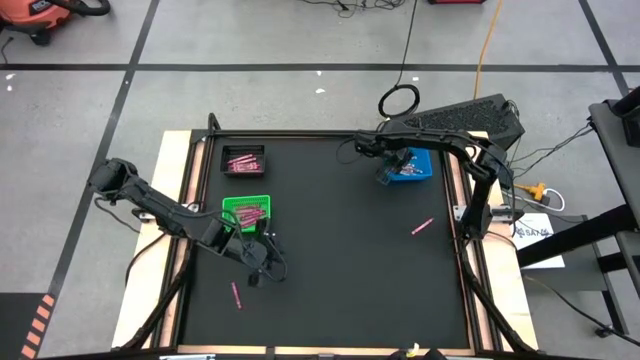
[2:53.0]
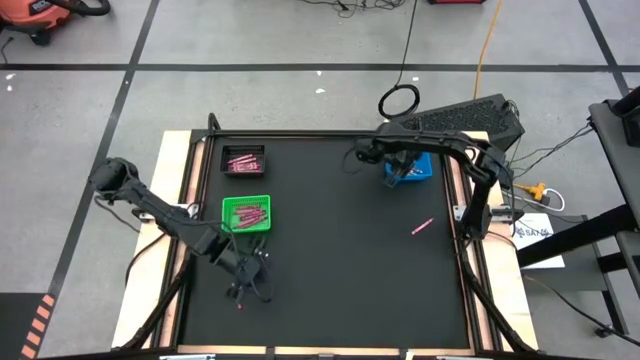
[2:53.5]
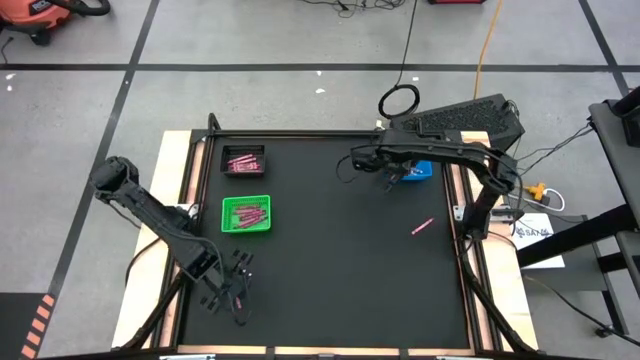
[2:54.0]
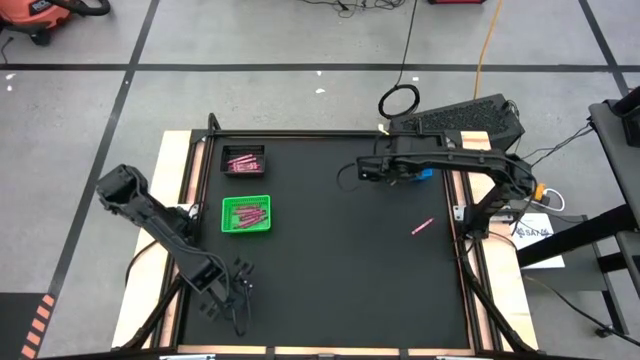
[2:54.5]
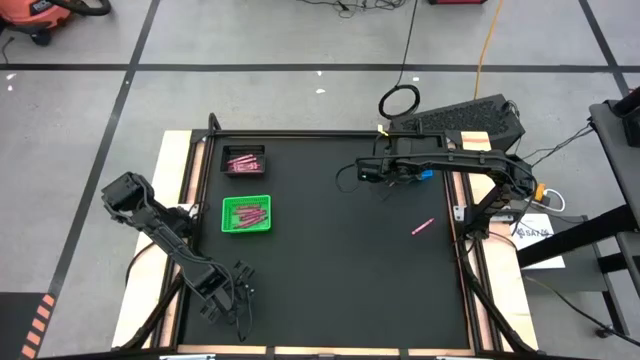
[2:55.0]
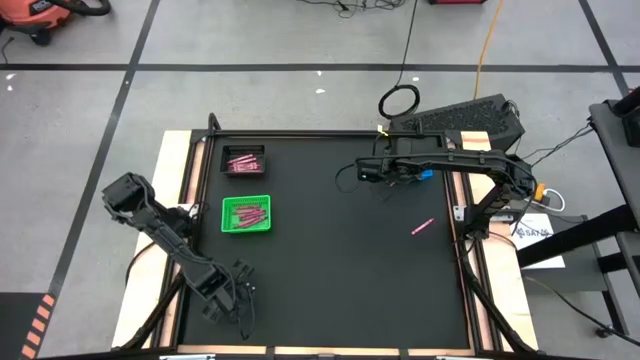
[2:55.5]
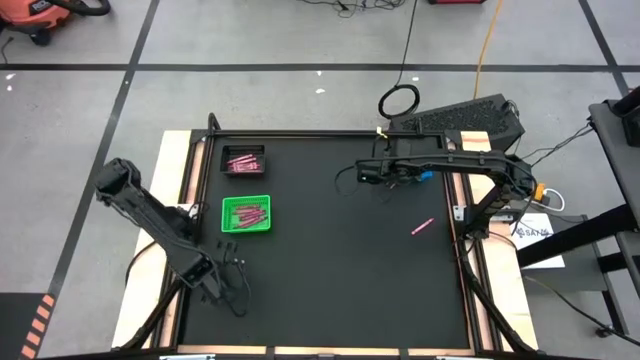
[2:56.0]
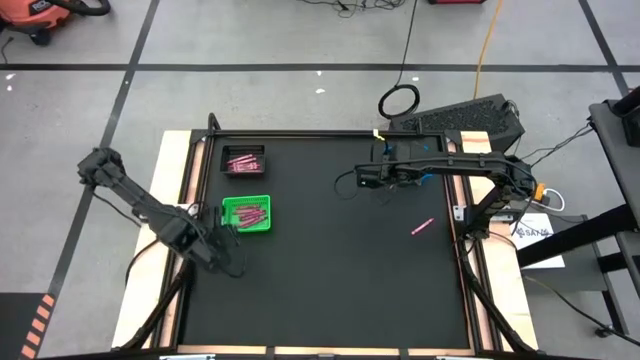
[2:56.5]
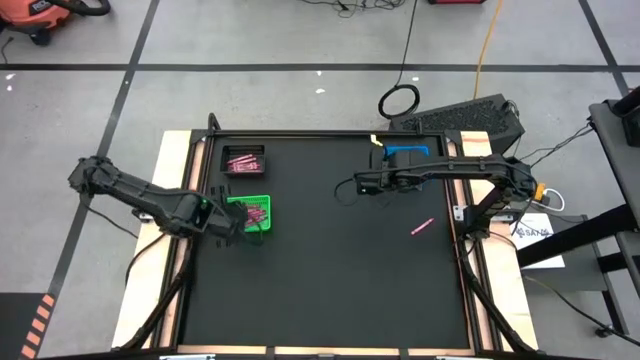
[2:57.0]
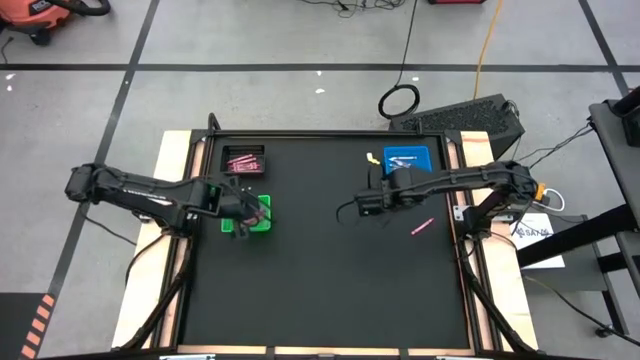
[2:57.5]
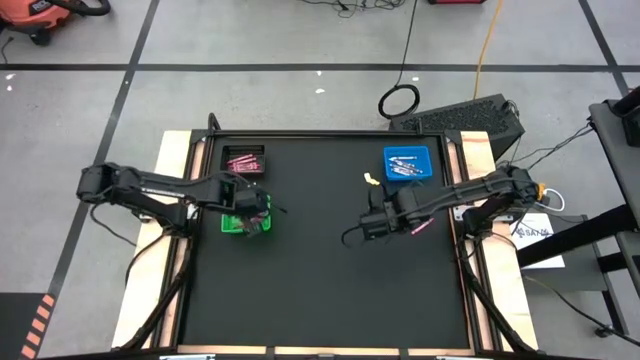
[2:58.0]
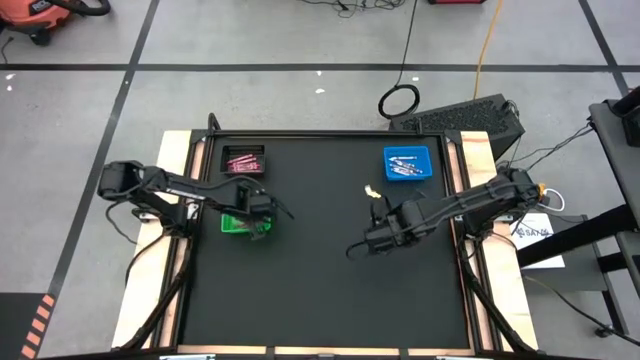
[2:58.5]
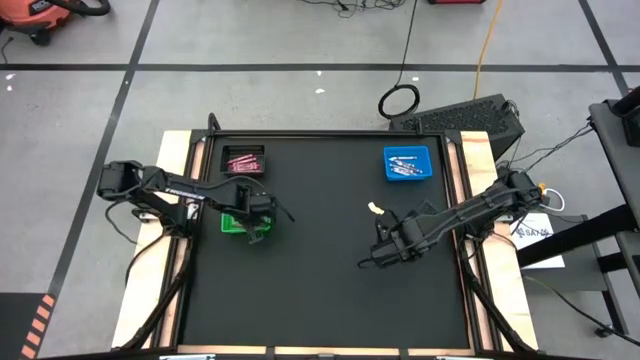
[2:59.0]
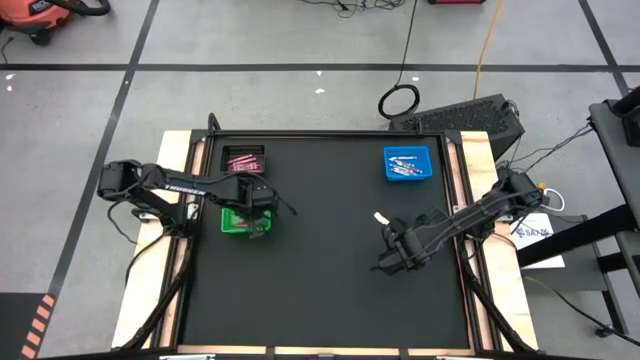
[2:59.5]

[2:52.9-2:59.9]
Task: Sort crayons
Put the red crayon into the green bin

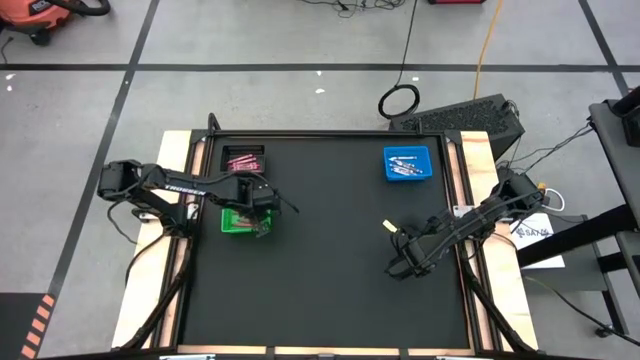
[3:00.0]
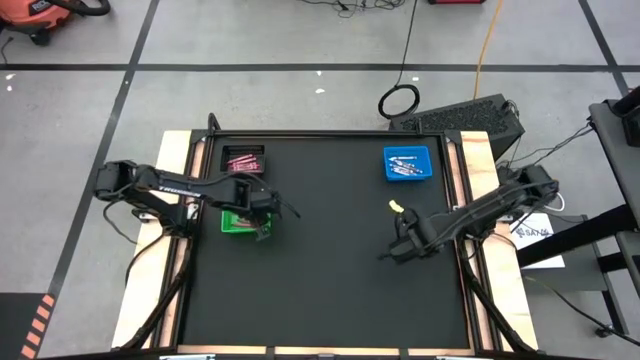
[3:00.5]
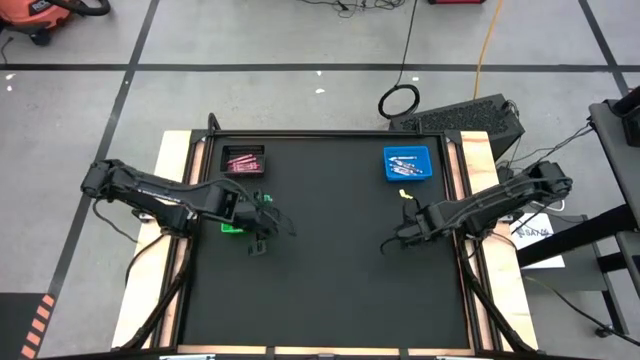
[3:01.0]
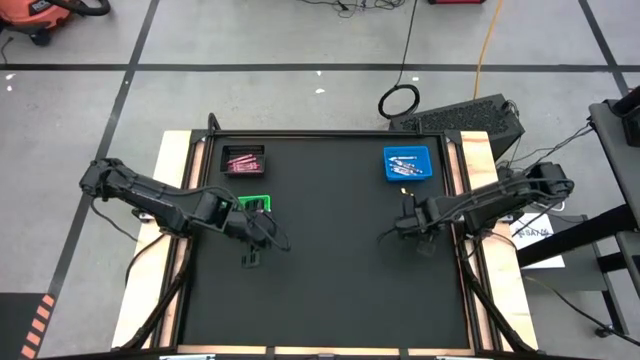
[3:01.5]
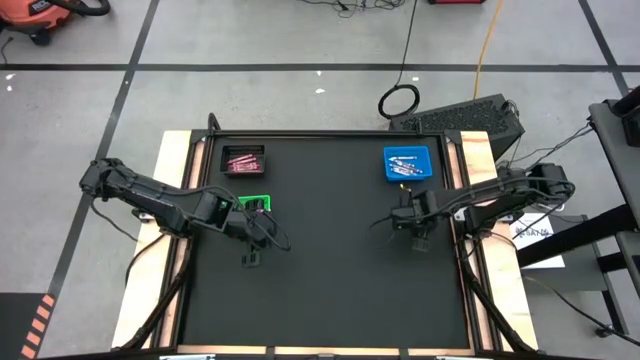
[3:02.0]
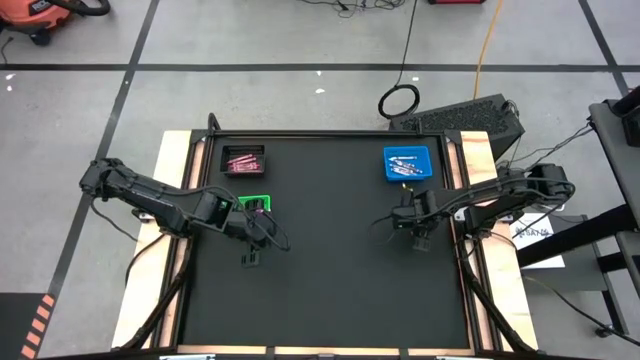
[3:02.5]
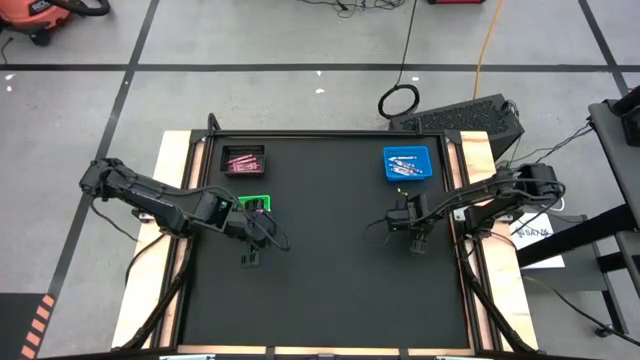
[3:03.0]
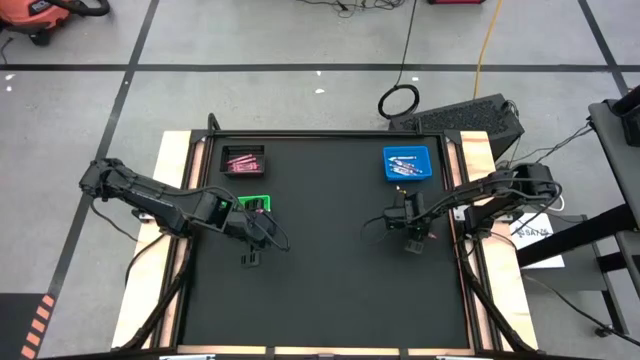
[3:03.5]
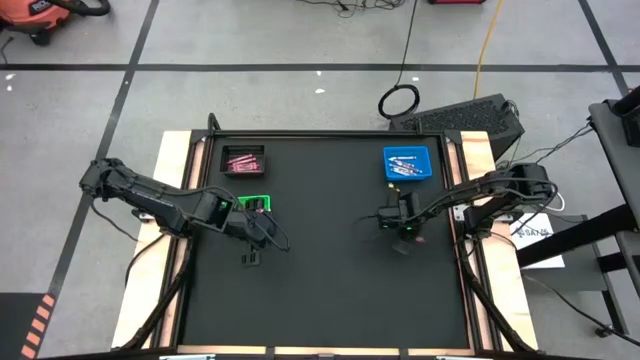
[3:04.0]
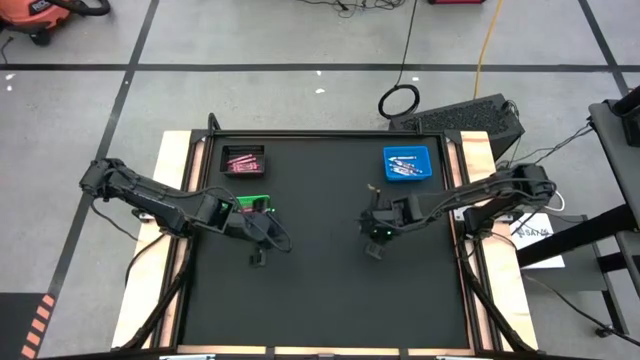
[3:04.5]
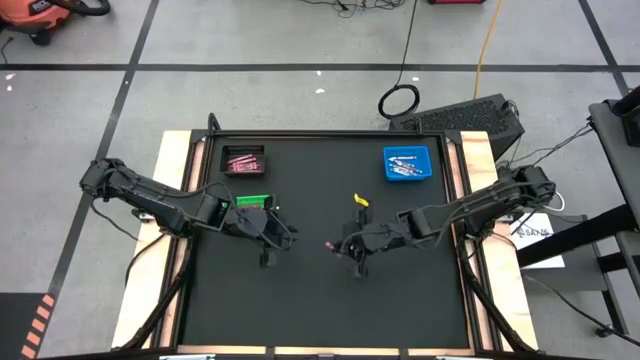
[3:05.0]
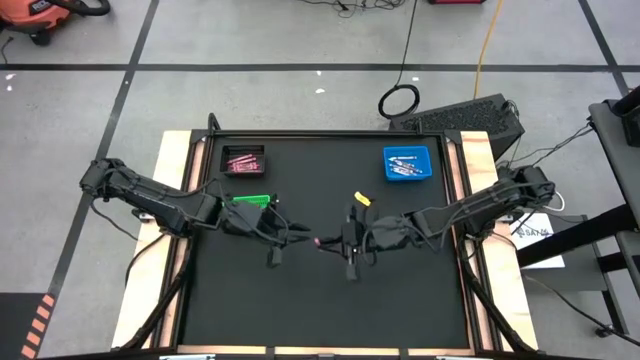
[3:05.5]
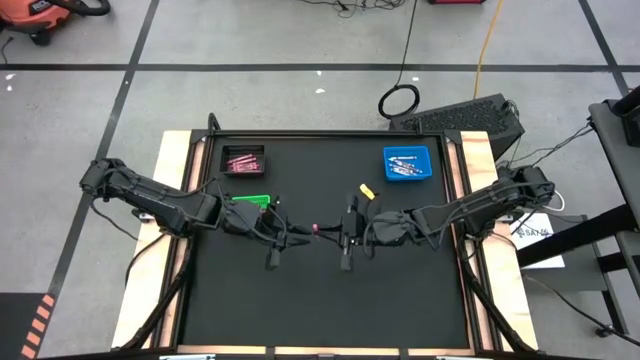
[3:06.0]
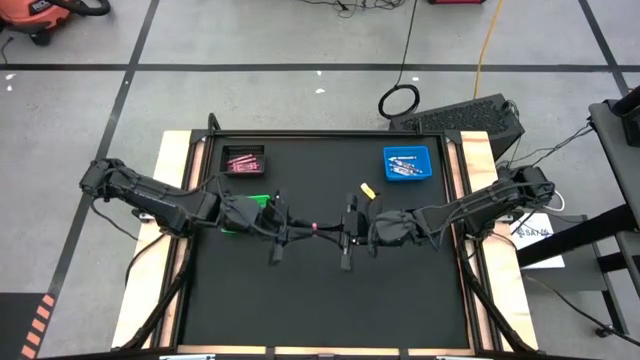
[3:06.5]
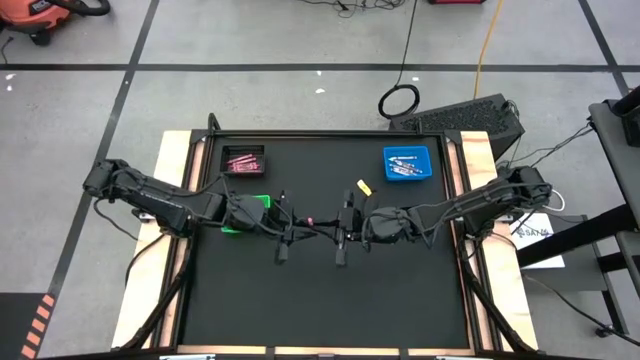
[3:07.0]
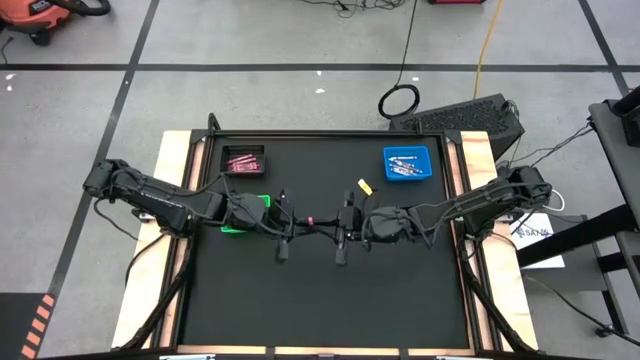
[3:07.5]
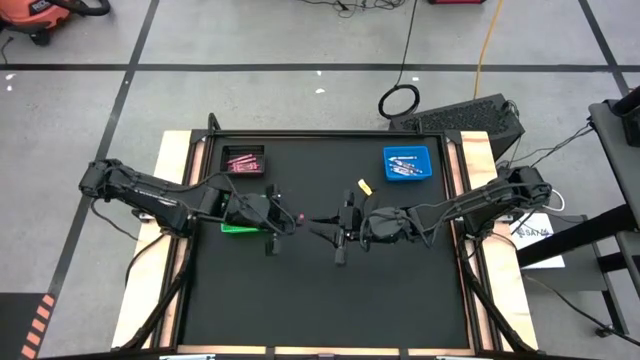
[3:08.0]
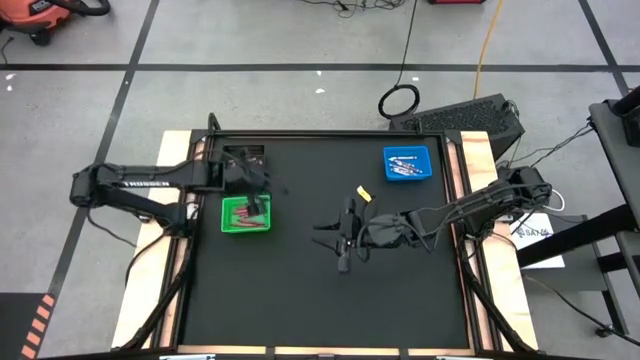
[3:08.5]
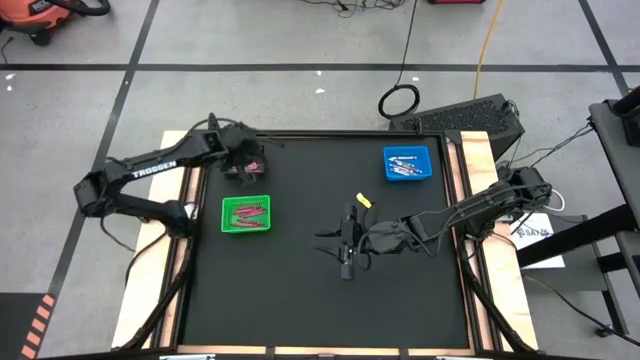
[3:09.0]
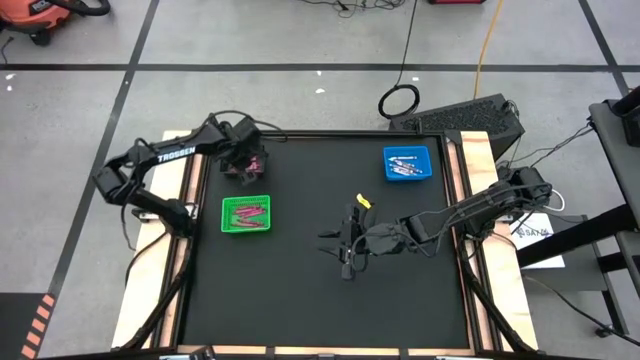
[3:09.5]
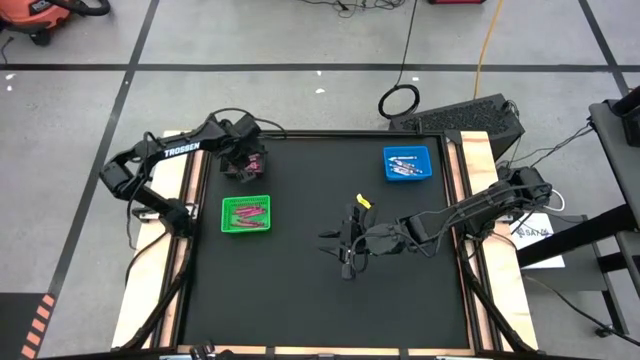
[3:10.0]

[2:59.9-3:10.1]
Put the pink crayon into the black bin

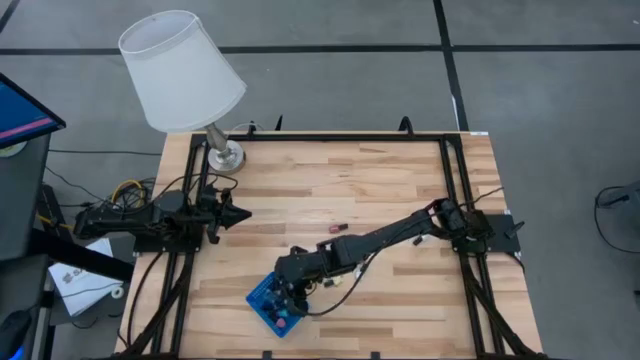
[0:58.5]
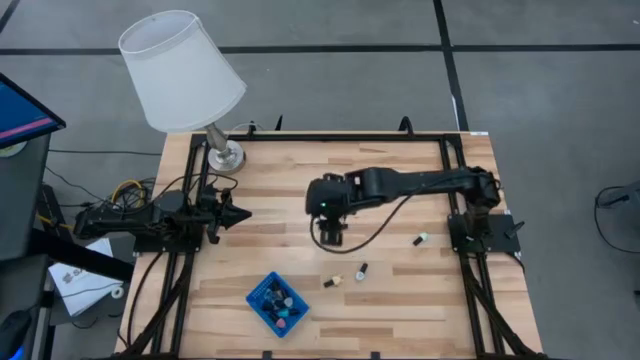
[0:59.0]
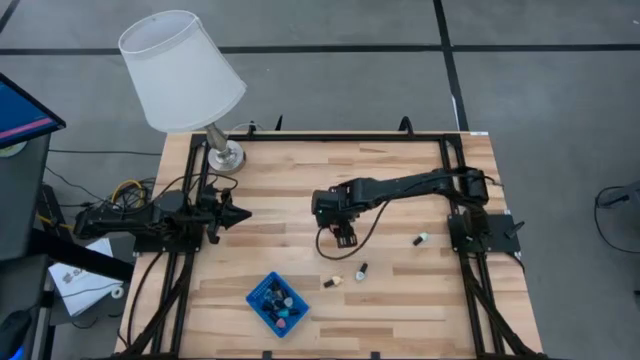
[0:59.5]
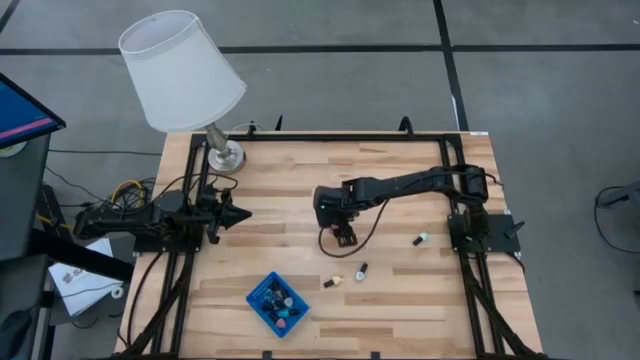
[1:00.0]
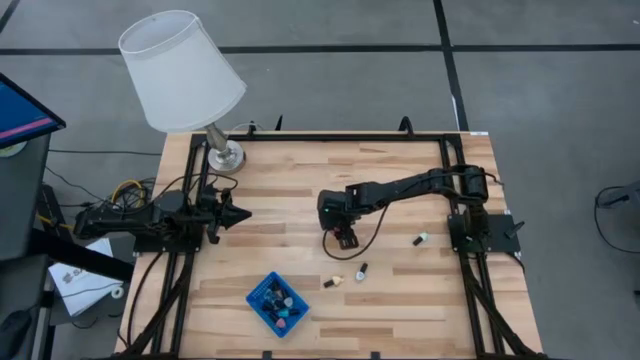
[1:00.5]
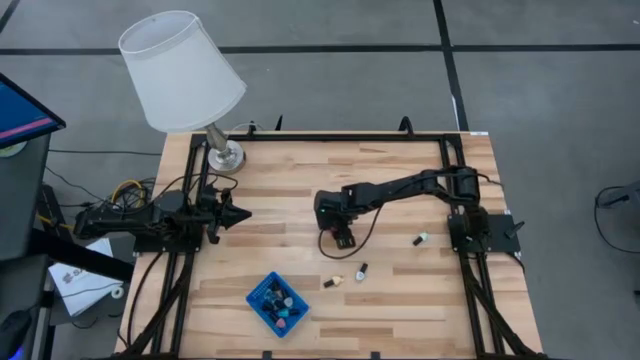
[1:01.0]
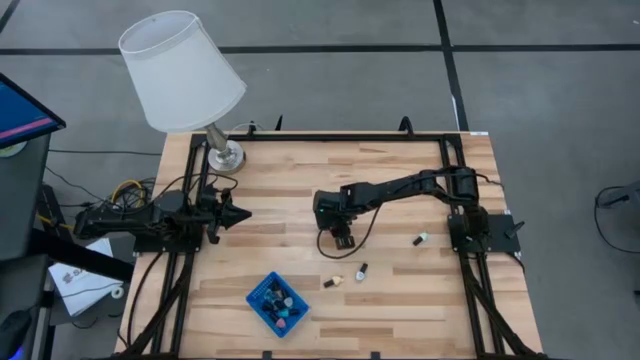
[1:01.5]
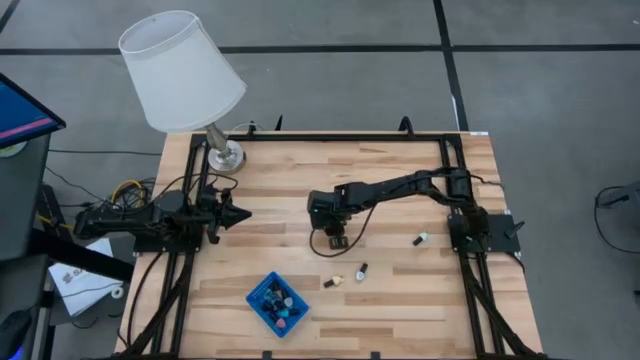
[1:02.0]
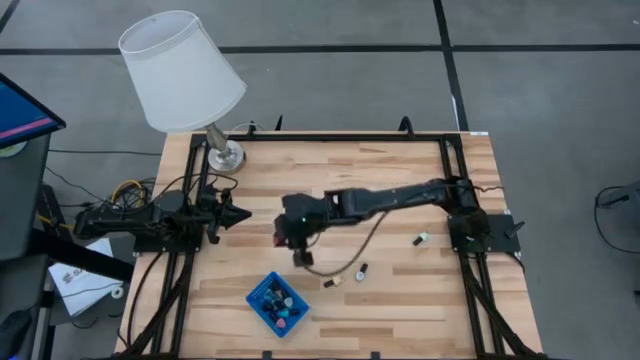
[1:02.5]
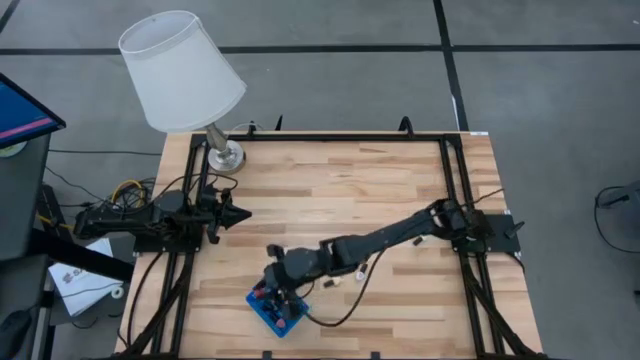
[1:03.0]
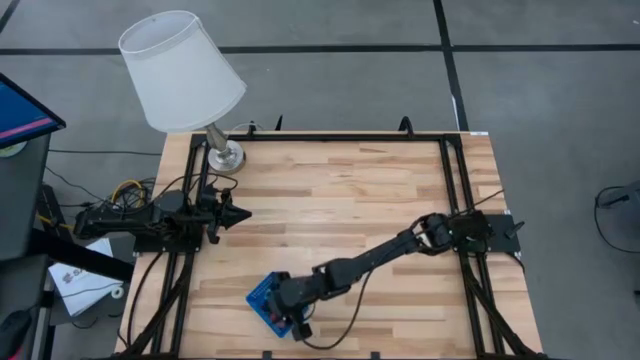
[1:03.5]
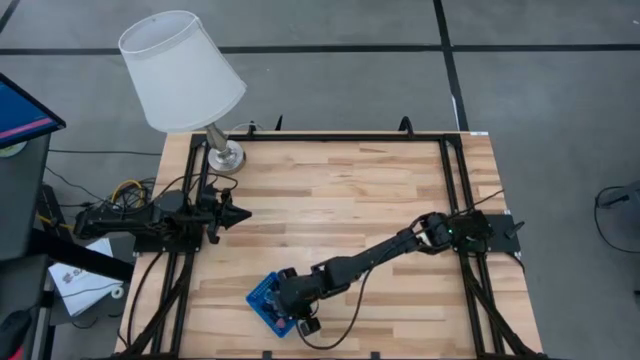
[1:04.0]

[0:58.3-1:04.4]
Task: Pick & Place Nail Polish
Put the red nail polish bottle in the blue bin
